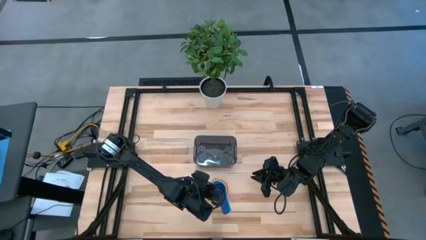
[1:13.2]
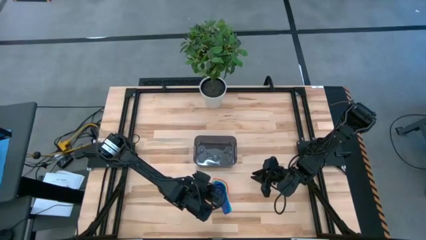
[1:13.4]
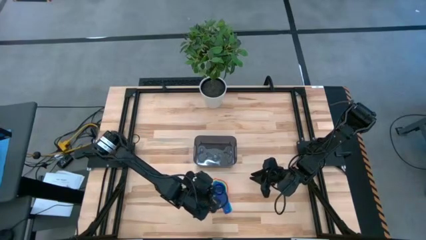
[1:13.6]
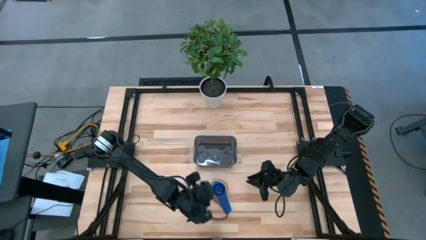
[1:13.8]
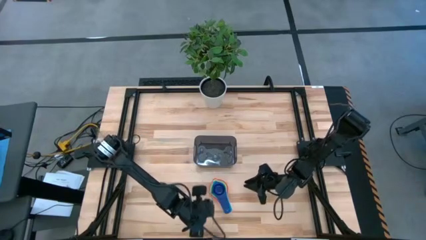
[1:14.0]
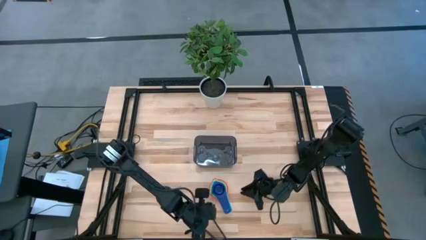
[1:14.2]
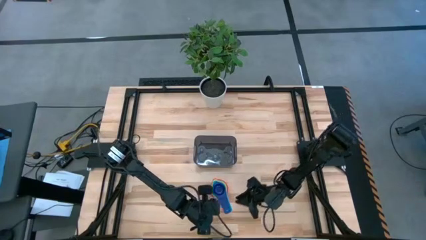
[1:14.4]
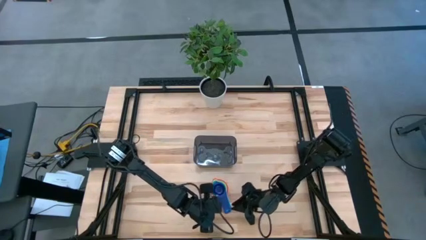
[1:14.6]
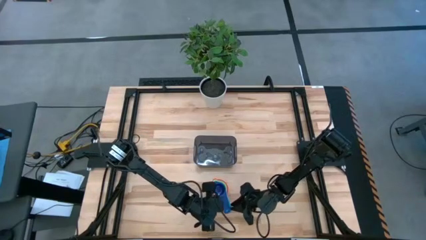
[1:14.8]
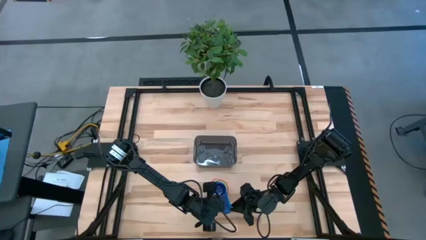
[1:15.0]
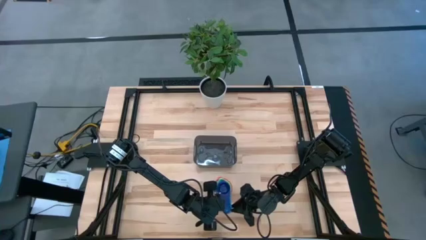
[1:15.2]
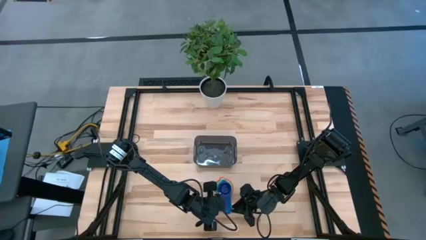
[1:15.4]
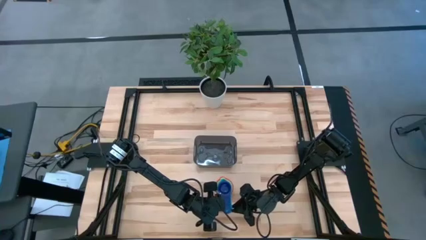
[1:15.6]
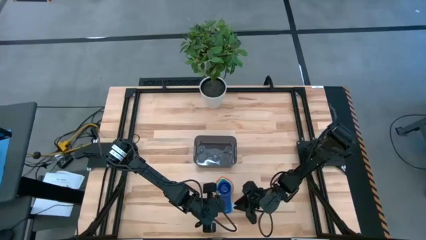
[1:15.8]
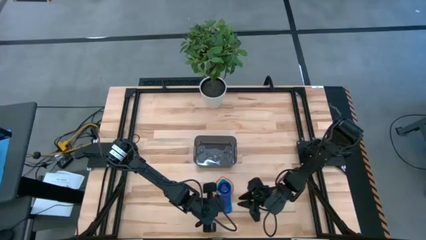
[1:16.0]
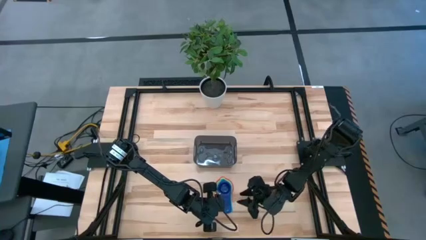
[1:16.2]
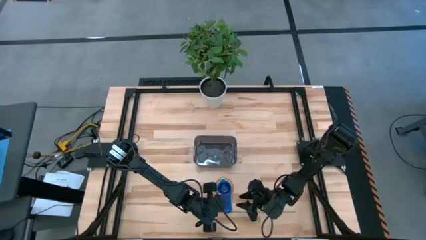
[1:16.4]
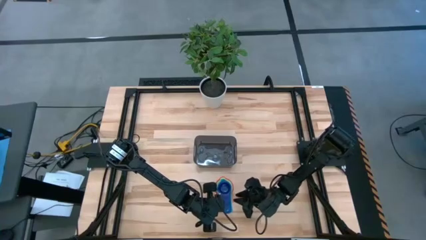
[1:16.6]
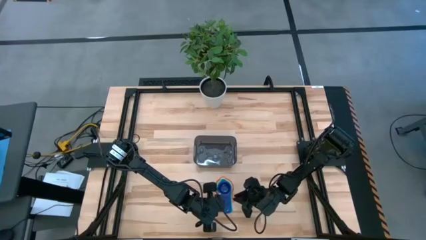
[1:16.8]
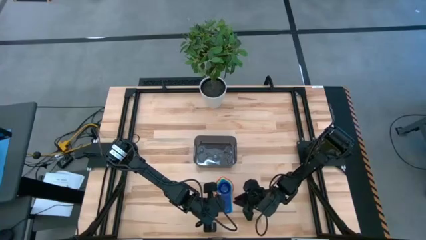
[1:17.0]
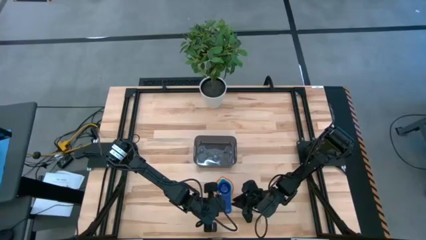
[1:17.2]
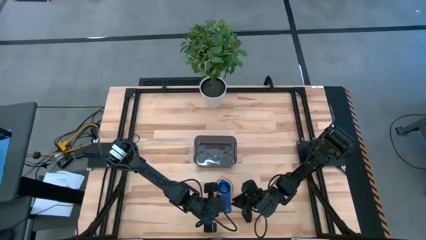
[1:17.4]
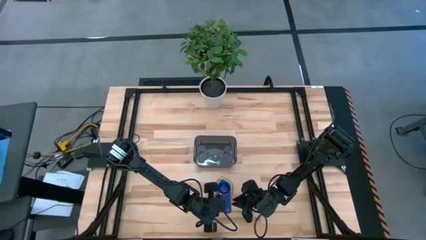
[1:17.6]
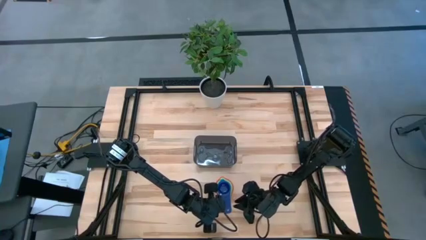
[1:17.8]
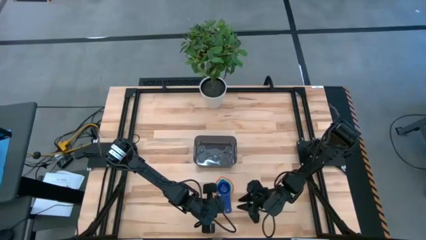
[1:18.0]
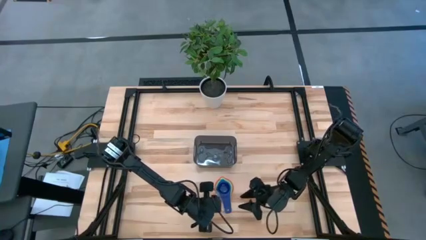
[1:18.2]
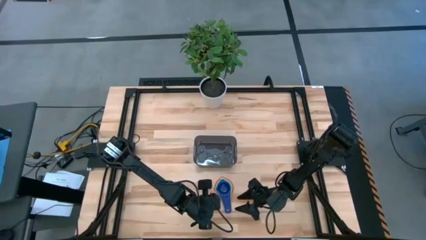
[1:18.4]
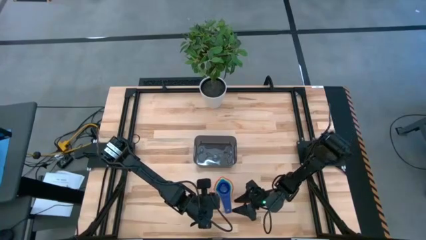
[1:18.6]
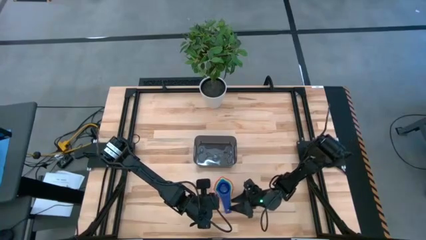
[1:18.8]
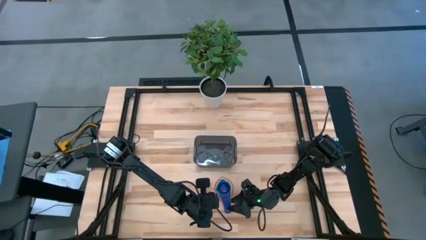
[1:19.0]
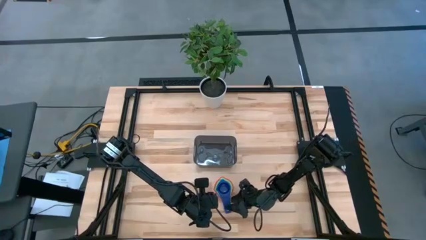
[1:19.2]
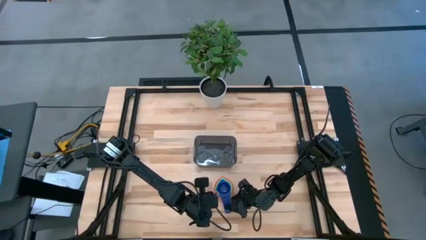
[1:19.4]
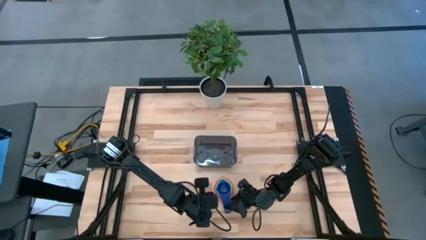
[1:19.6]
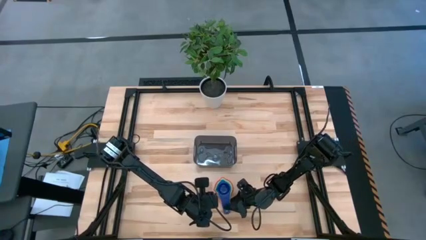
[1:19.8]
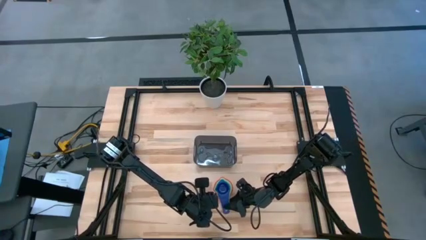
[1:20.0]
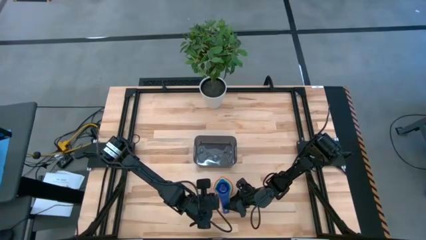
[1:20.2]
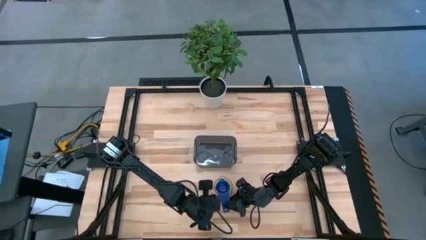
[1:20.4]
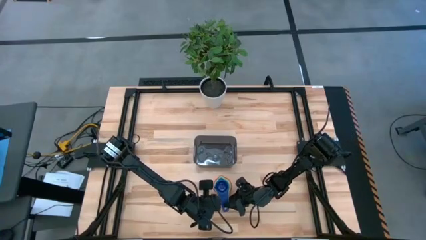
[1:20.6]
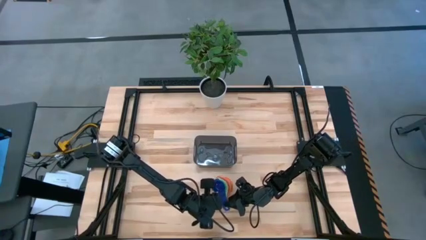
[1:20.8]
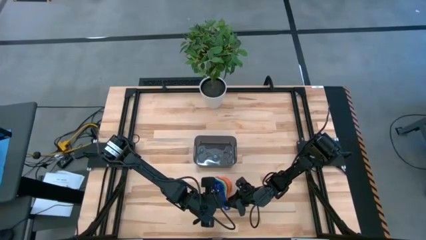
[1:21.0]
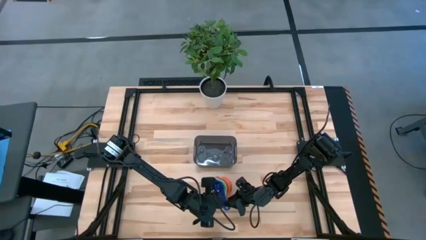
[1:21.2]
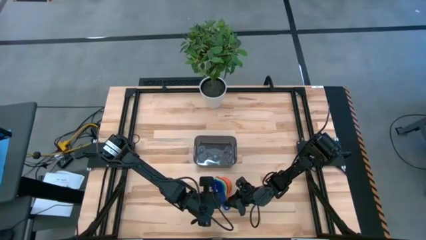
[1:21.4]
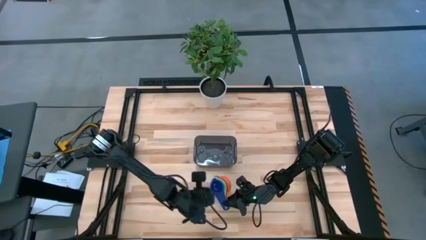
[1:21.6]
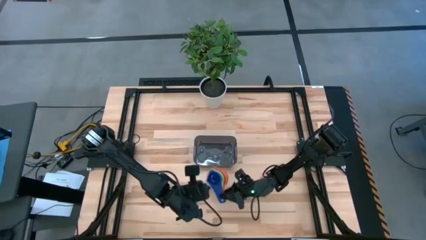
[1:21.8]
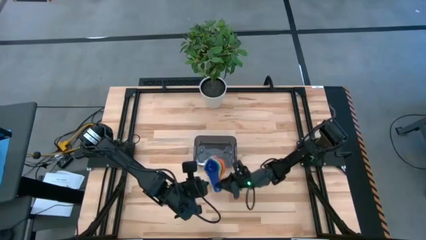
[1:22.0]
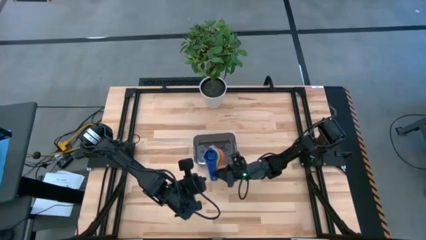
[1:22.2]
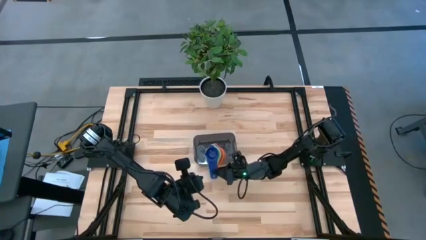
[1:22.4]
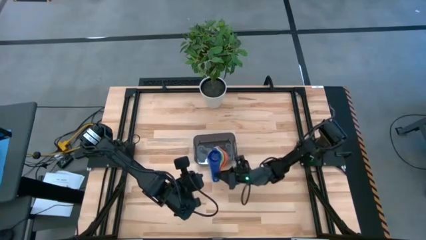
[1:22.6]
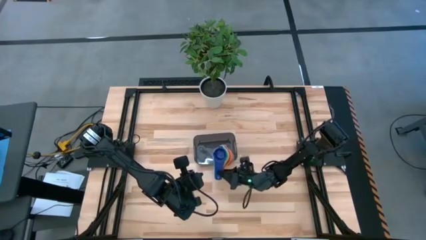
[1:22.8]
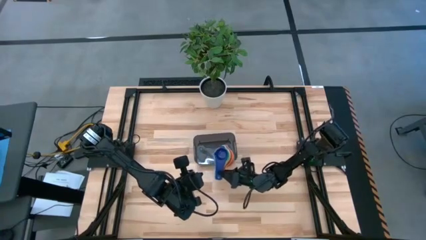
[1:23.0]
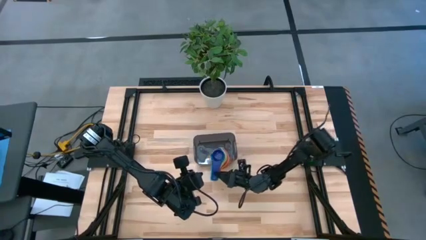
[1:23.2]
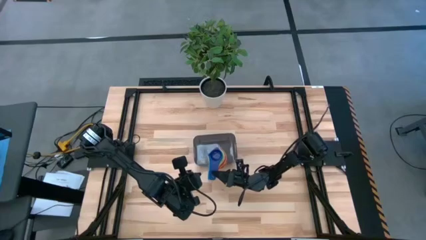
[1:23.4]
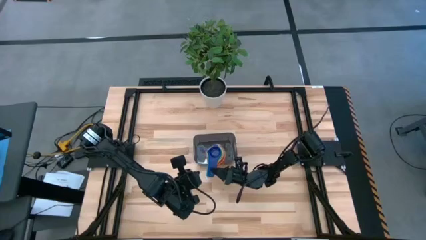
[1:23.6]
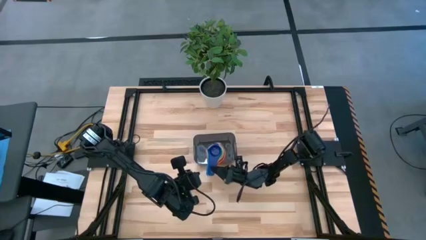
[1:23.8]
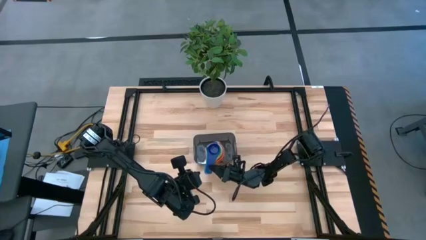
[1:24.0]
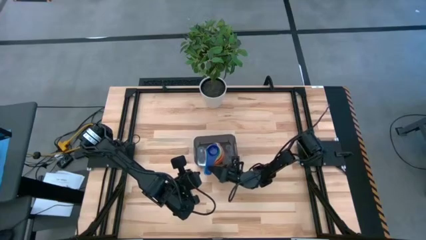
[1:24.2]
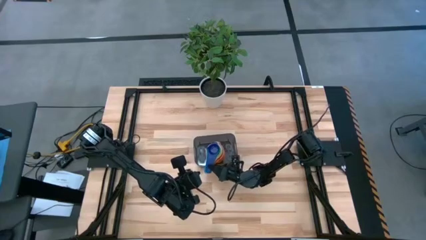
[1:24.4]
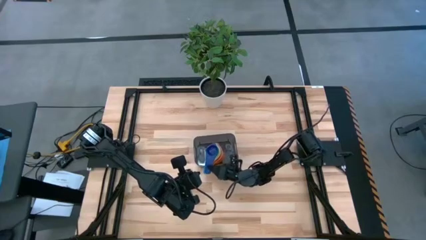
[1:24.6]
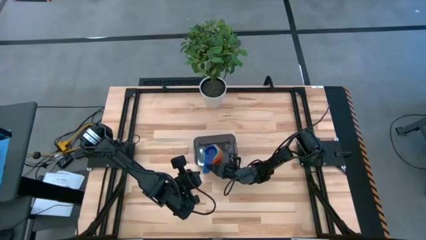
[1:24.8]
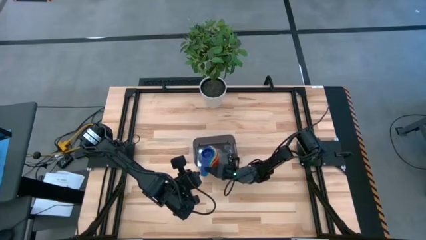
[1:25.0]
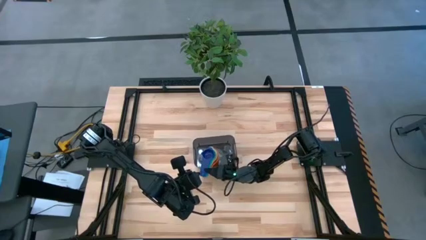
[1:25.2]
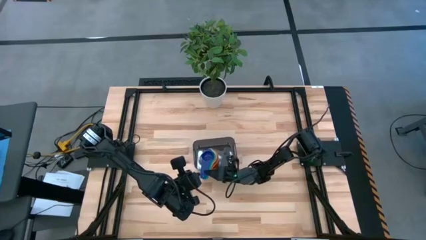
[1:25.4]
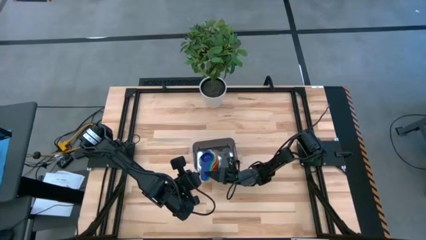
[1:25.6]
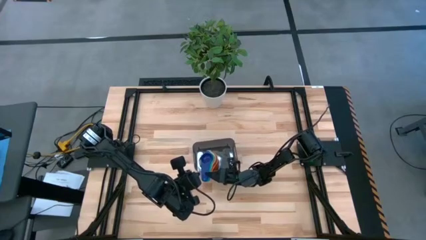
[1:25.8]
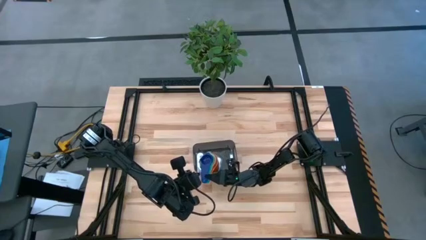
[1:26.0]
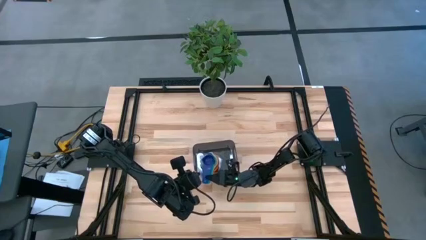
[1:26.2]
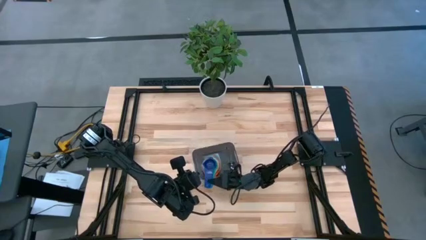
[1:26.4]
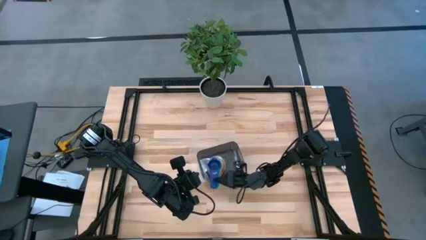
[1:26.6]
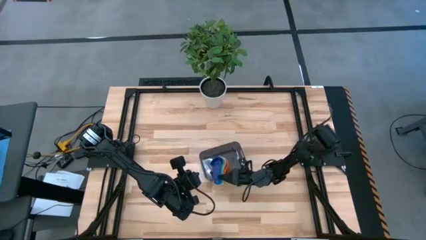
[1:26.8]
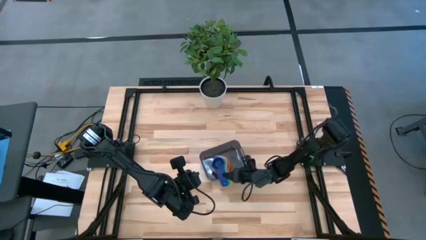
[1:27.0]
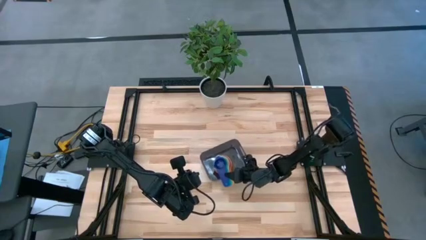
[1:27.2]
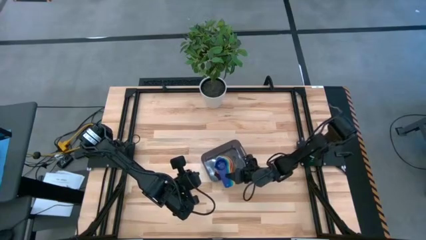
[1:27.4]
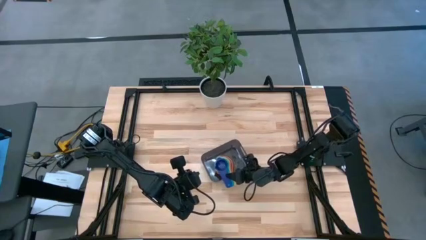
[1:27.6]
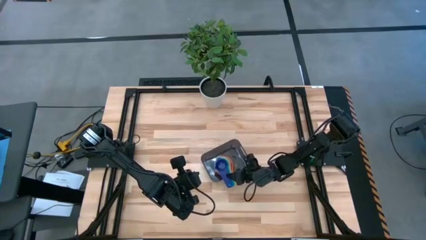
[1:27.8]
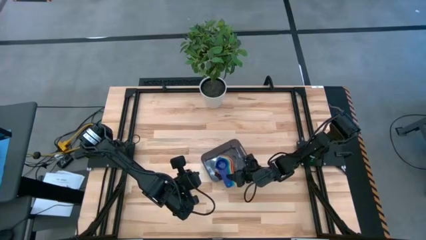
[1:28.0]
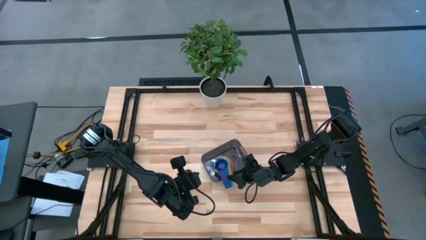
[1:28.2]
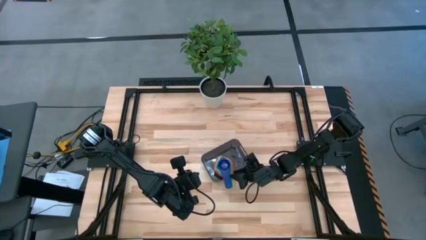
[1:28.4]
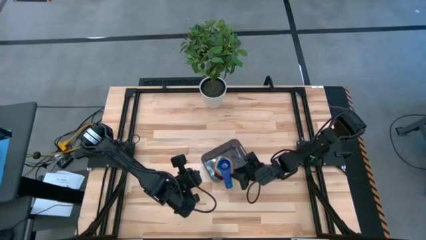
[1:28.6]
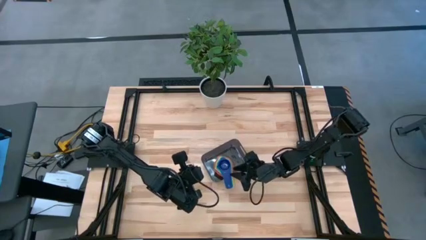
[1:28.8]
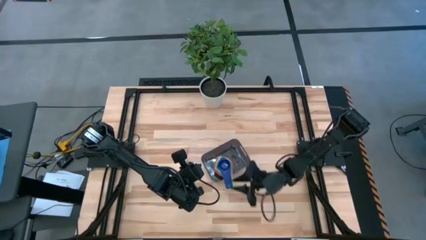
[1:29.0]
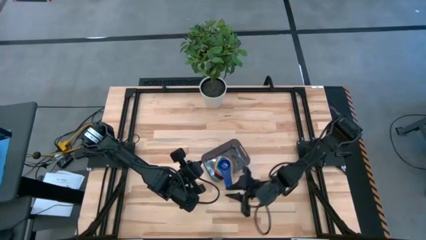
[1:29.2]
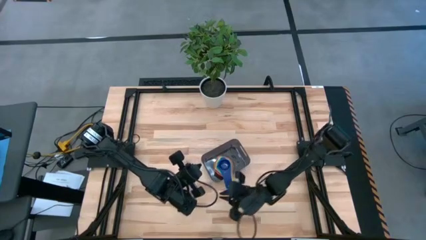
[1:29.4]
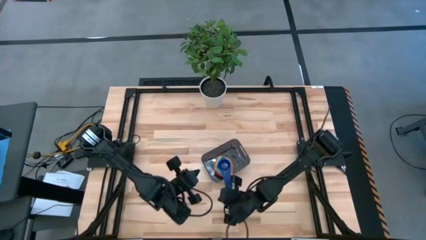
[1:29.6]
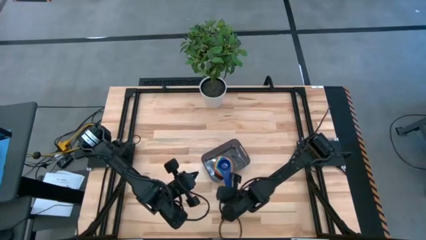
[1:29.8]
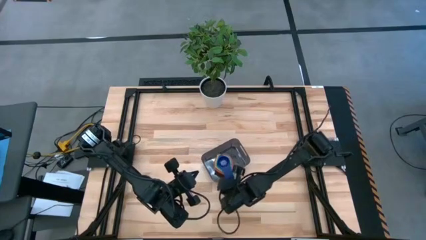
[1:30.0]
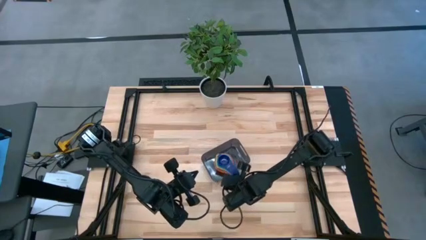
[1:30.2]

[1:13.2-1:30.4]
Task: Nest measuring cups in basket
Put the nested measuring cups into the black bin

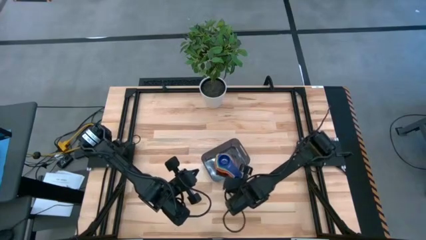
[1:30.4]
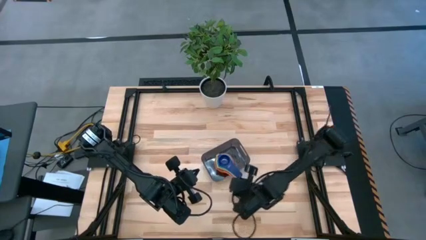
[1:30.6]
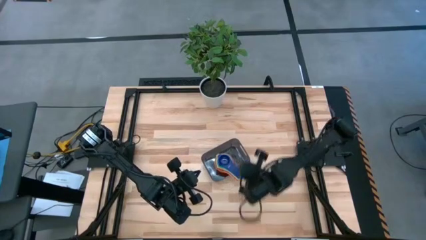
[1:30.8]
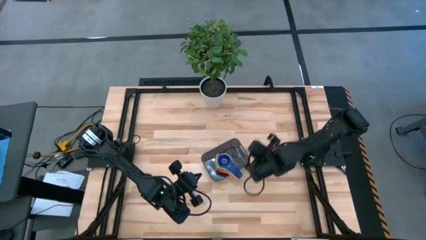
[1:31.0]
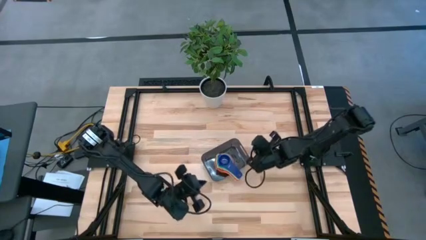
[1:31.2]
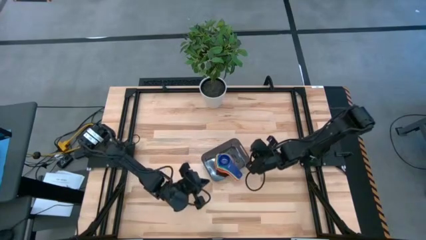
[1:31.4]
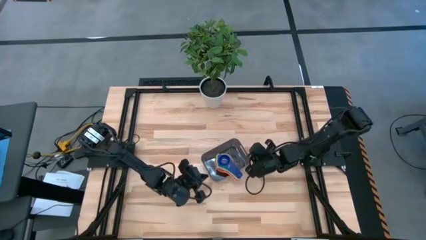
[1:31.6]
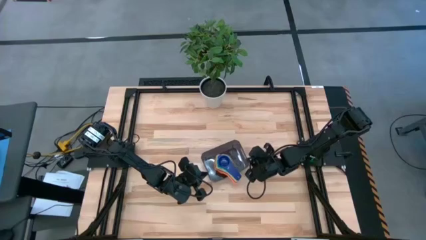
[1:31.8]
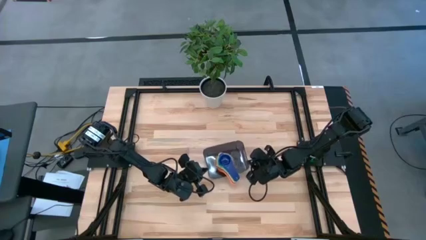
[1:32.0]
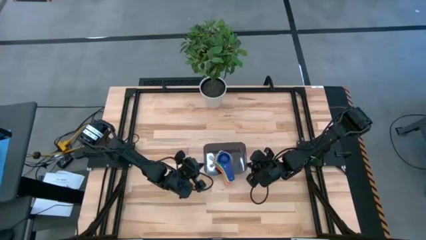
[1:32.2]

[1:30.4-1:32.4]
Adjust the black bin
